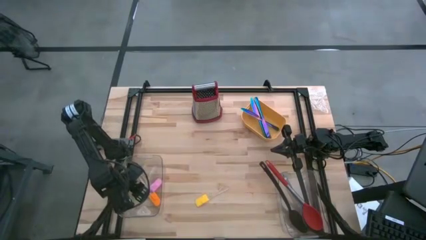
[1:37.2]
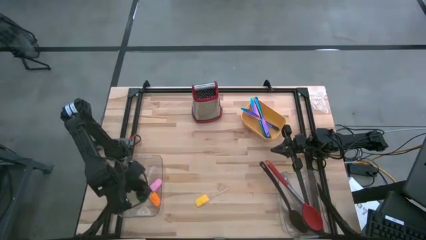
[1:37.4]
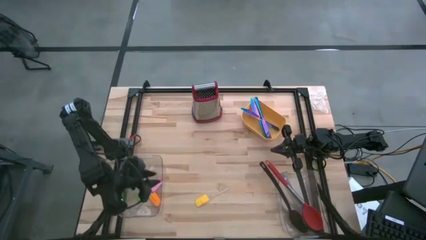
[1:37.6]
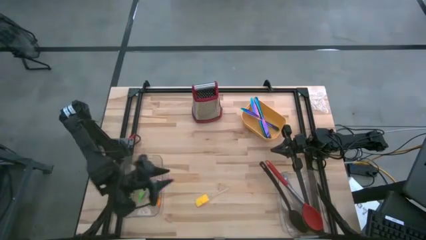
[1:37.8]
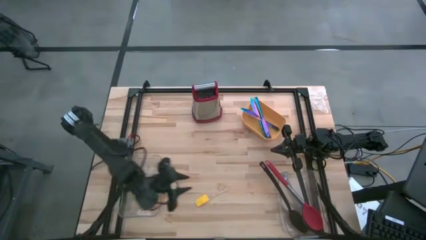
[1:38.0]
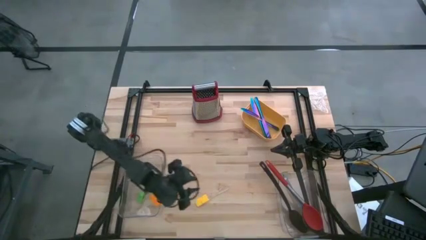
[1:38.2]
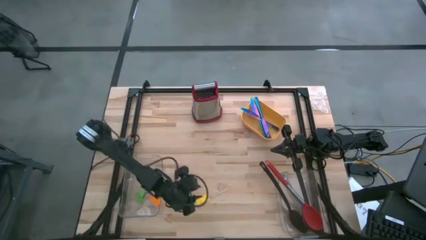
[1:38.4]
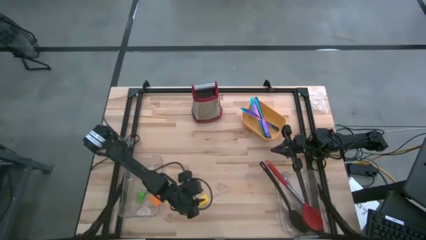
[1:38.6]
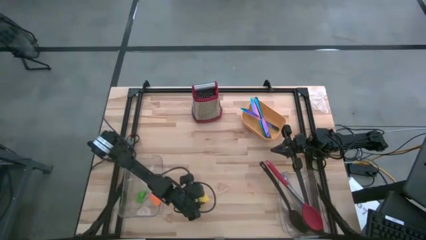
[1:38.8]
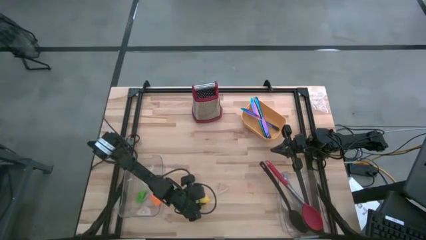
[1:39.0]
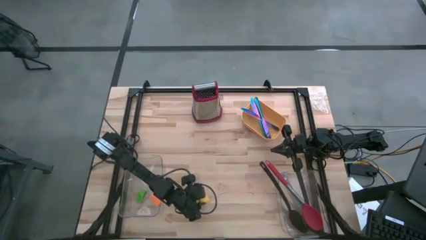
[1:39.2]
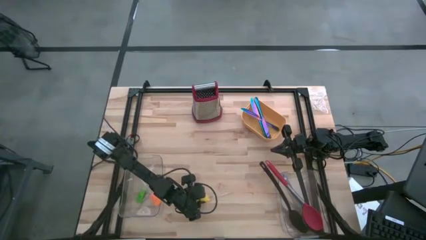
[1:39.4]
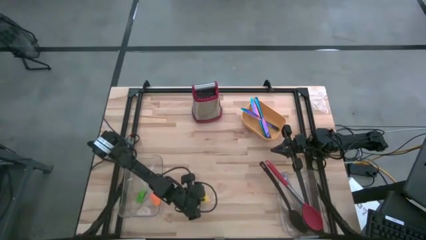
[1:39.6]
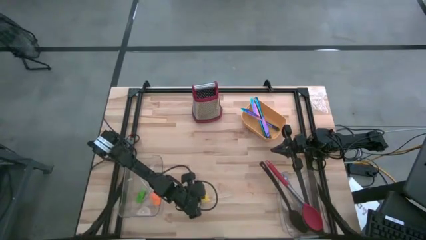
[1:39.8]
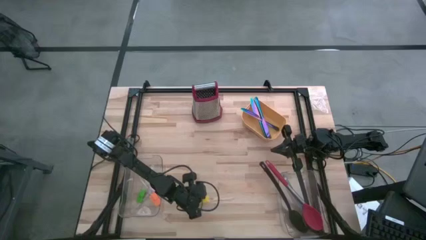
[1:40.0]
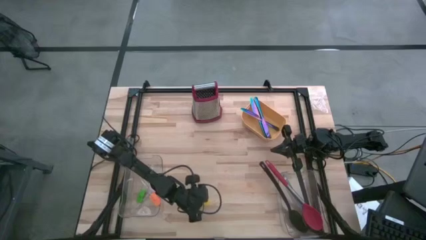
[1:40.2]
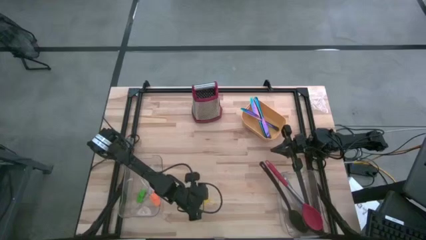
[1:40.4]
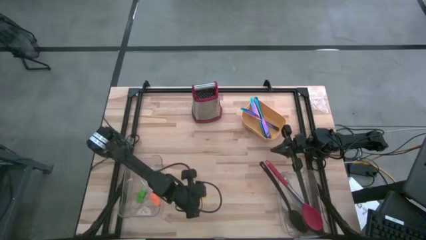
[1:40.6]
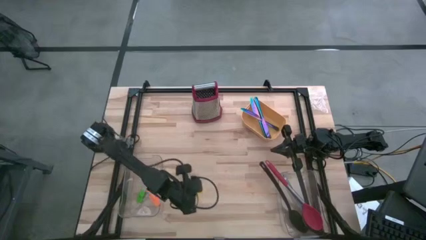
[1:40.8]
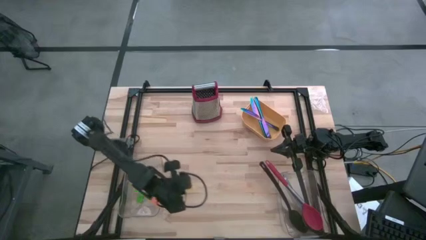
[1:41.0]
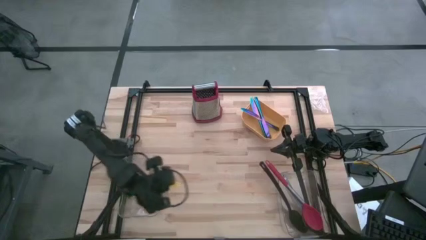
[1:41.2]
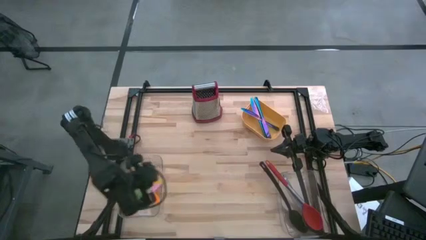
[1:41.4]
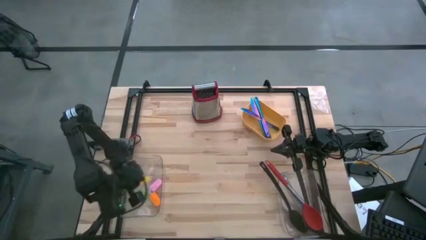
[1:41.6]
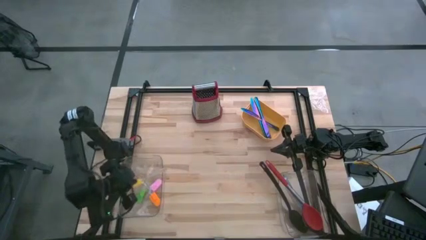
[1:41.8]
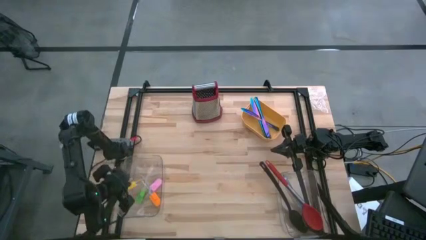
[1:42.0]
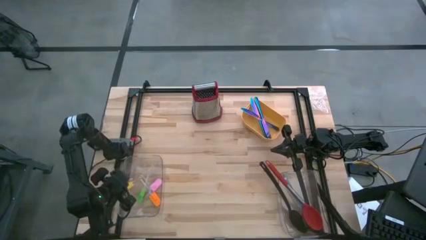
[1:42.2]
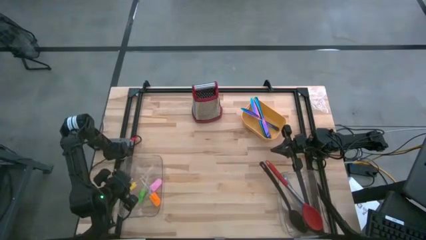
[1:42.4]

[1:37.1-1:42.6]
Task: Pick & Place Kitchen Items
Put the yellow spatula into the left transparent bin

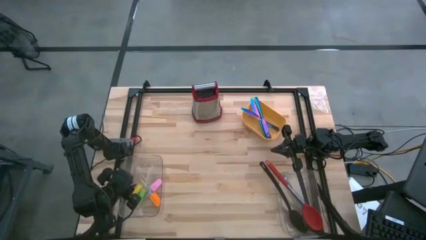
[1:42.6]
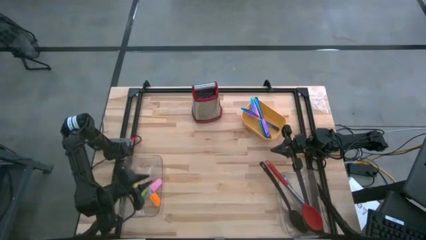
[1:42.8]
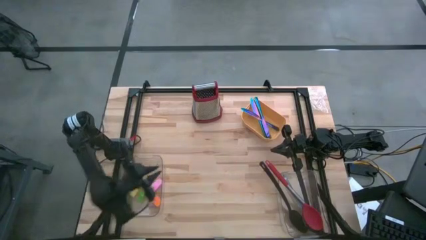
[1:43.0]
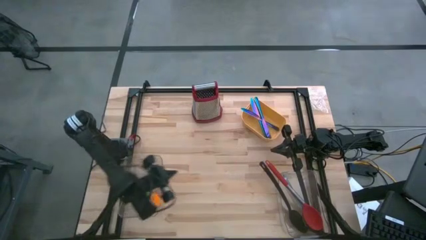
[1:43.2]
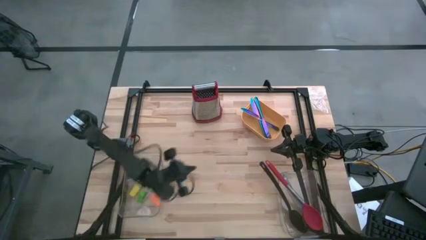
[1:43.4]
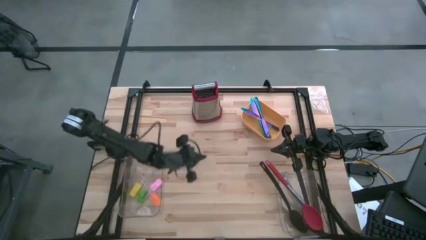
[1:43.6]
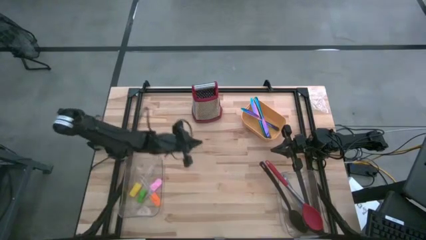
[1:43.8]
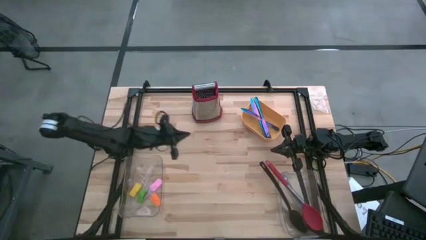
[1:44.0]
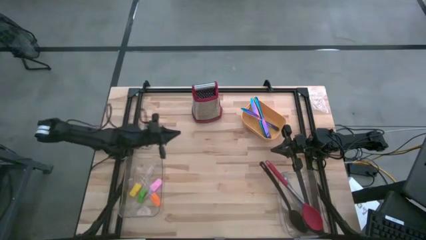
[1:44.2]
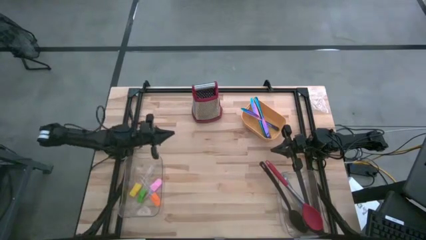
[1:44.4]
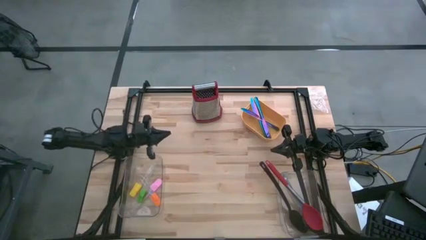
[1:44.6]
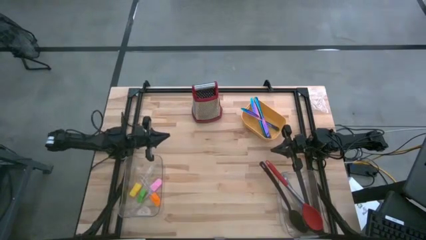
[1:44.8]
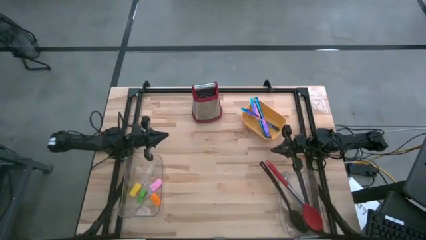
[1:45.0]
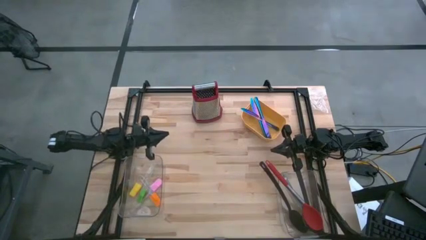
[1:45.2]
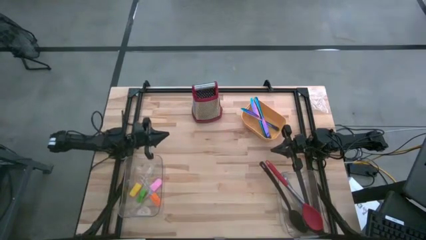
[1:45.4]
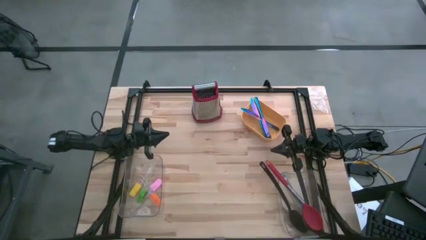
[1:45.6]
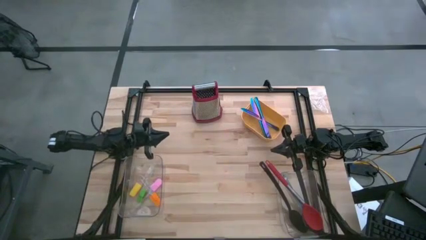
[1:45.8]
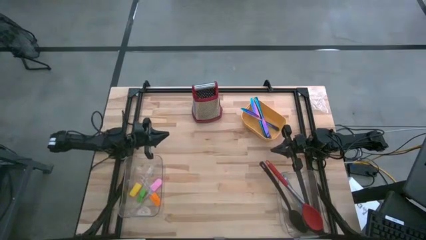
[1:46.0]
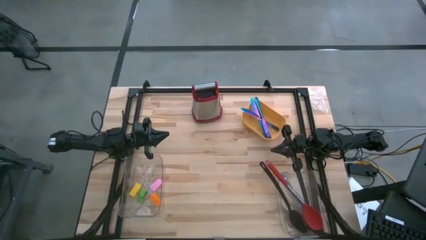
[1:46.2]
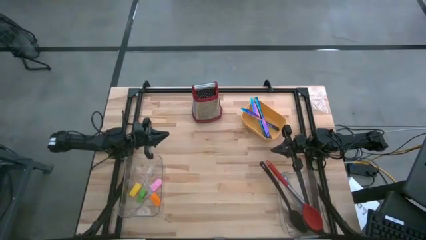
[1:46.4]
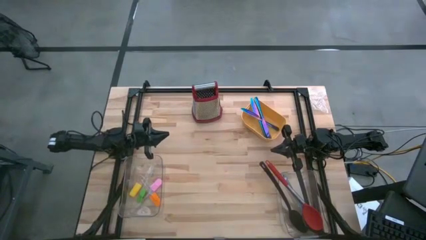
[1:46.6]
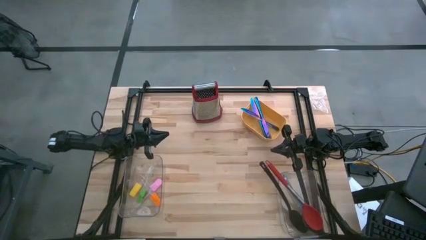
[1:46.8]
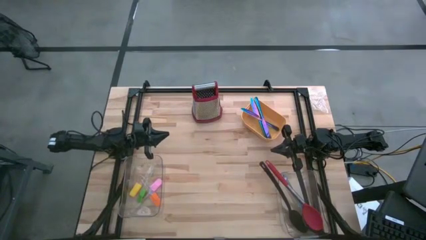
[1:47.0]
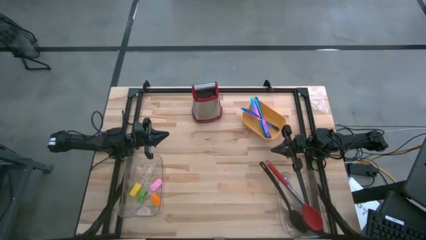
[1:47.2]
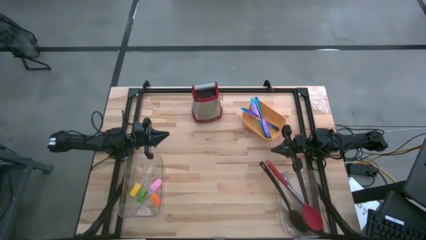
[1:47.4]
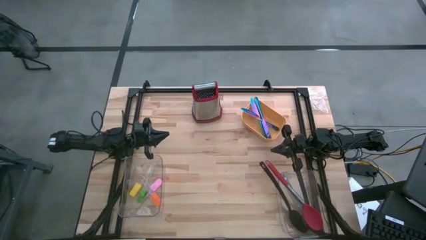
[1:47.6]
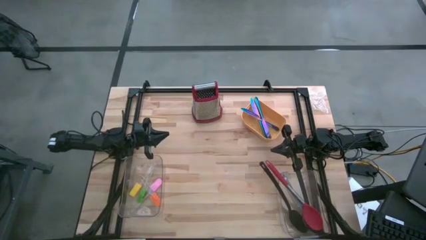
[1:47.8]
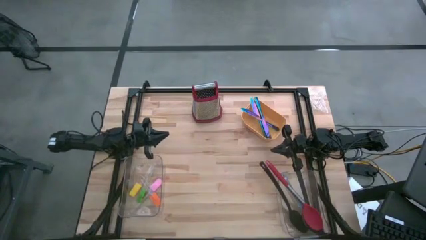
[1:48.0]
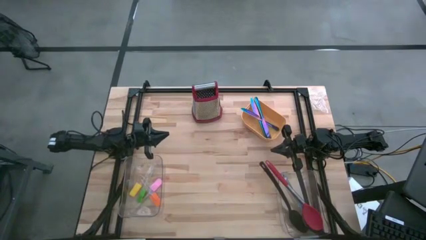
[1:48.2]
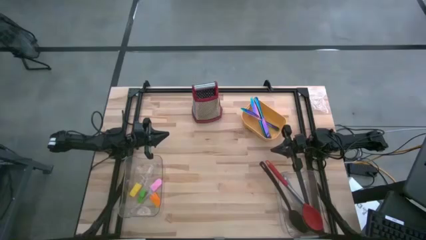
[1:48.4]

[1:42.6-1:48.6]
Return to Home Position

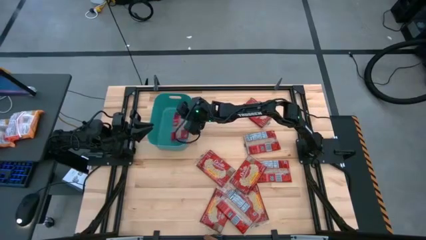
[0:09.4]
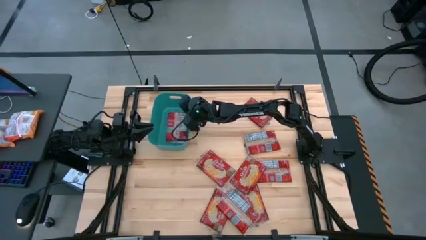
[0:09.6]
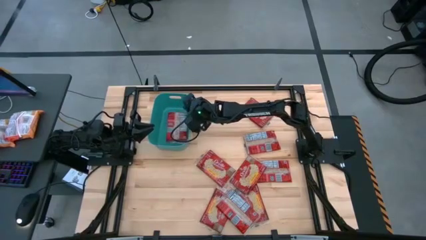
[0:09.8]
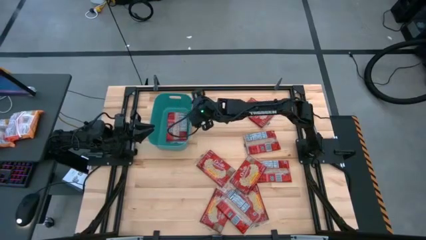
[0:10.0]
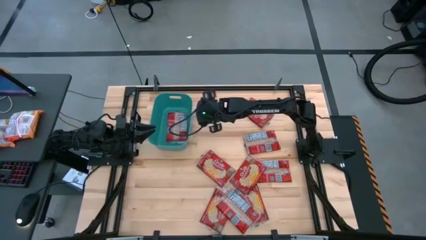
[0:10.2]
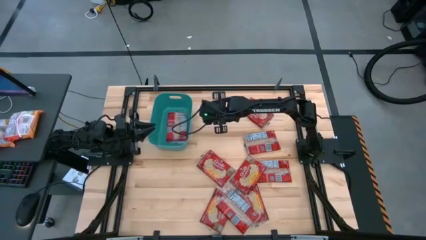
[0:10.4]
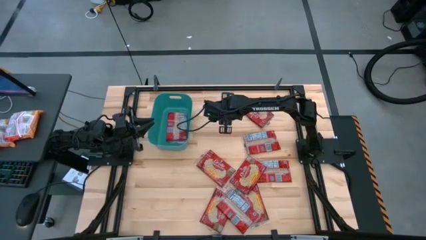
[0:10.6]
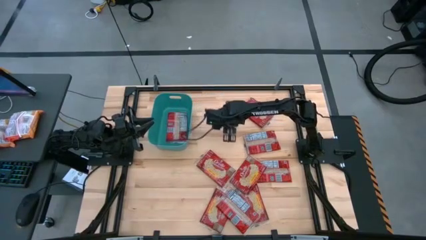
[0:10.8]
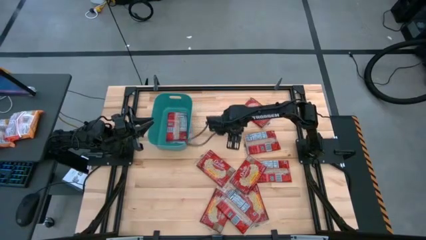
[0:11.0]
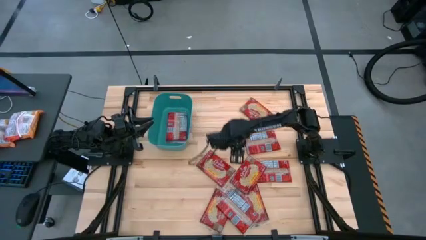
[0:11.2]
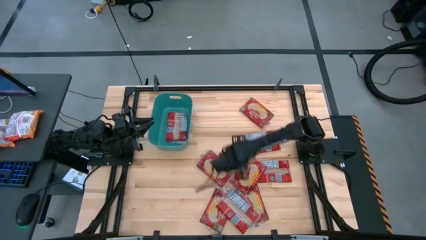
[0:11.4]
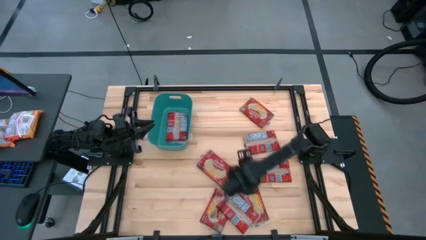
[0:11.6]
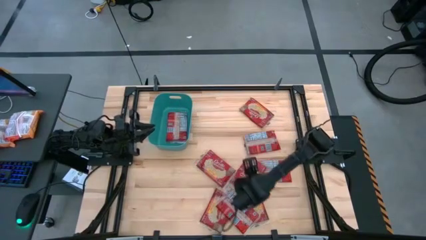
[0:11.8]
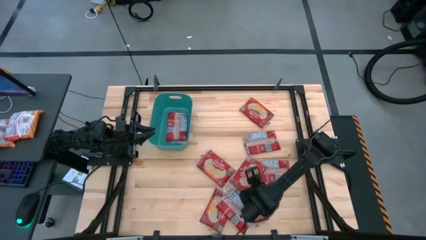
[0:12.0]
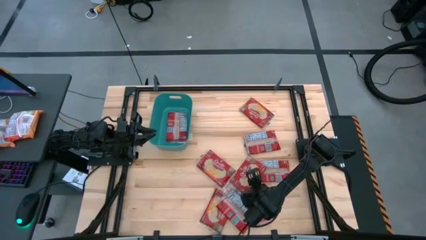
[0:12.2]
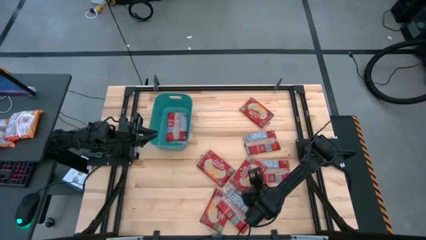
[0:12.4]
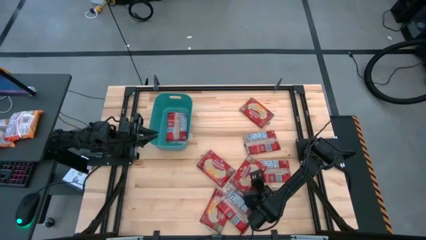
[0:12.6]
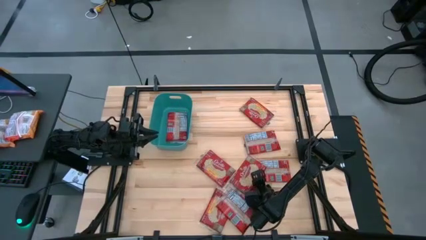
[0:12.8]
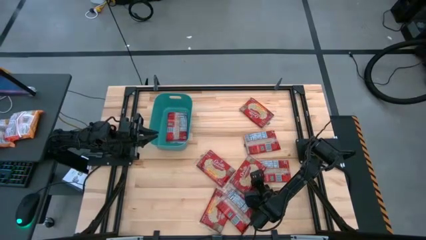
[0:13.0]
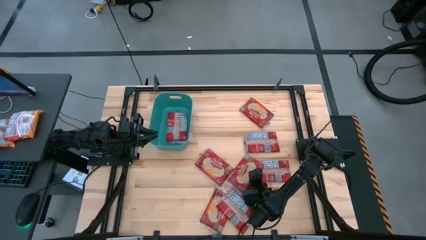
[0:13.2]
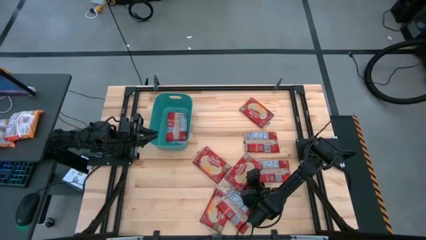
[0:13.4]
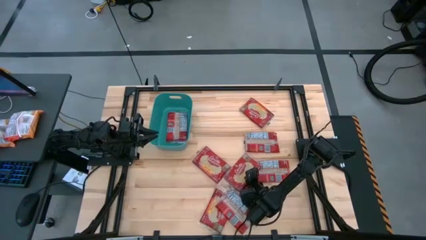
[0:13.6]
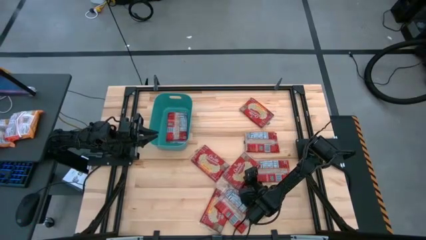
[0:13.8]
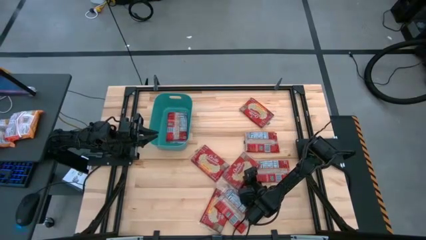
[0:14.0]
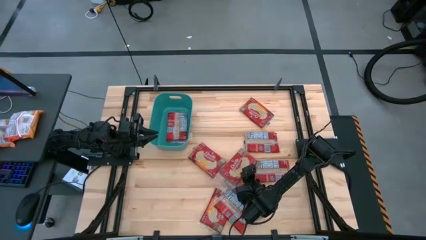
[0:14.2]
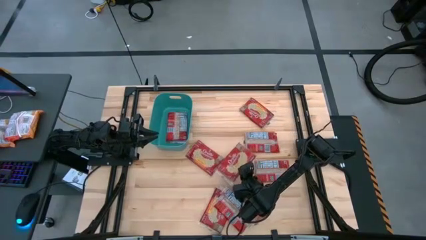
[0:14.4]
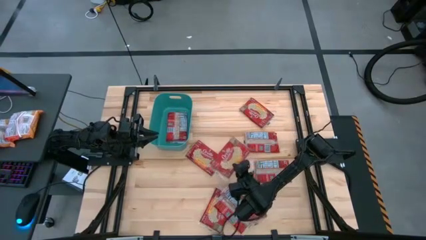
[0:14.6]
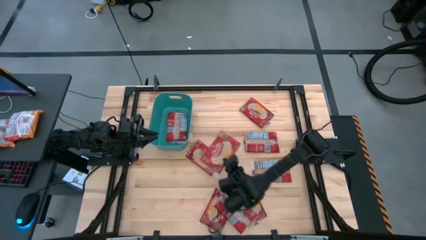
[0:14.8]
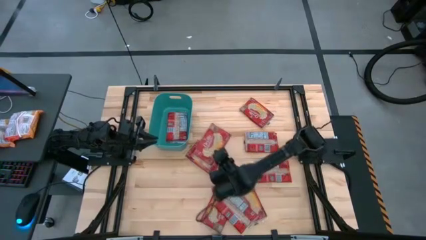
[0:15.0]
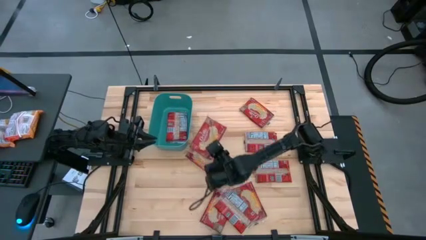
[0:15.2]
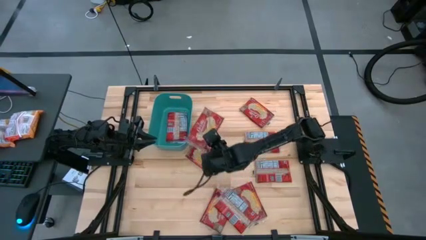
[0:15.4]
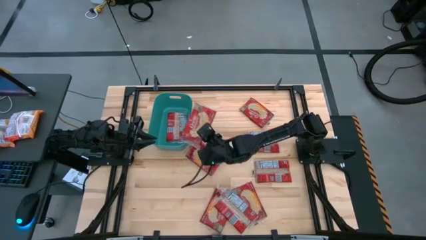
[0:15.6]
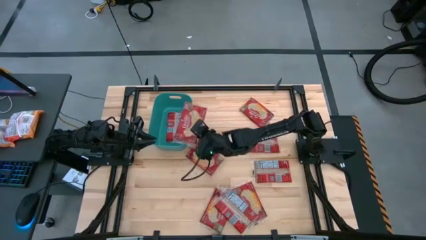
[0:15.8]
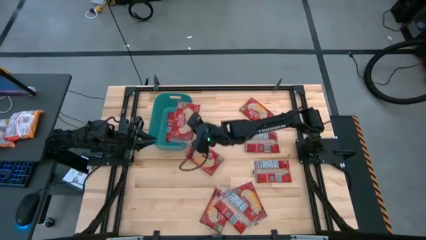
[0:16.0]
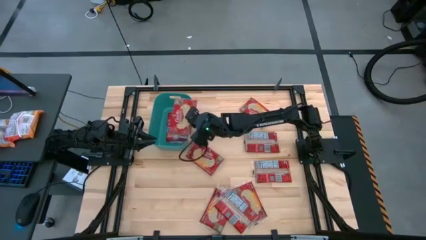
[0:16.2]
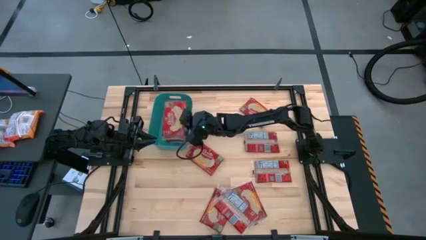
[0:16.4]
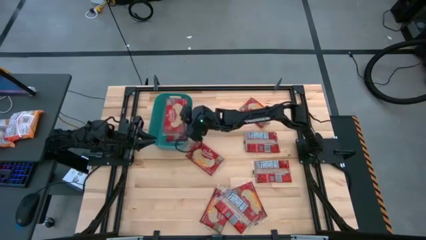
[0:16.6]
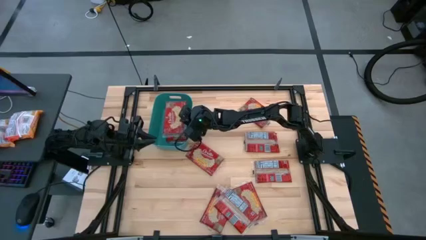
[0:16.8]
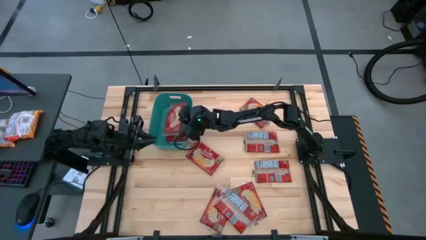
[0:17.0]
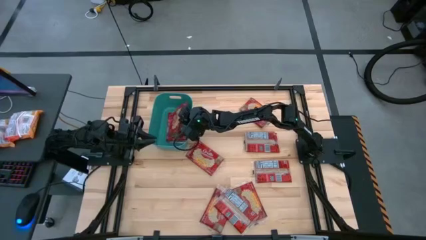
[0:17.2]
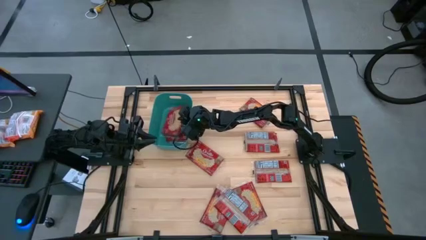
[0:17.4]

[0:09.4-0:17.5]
Task: Sort popcorn bags into baskets
Put the red popcorn bag into the green bin
